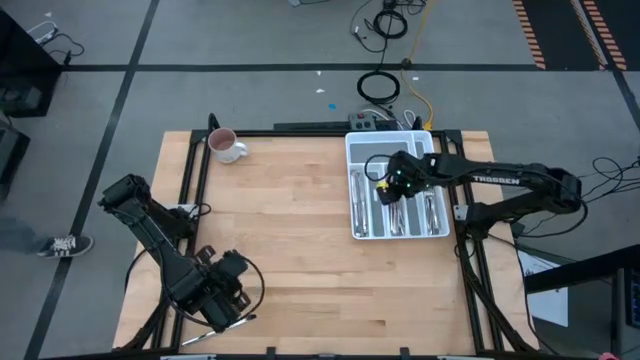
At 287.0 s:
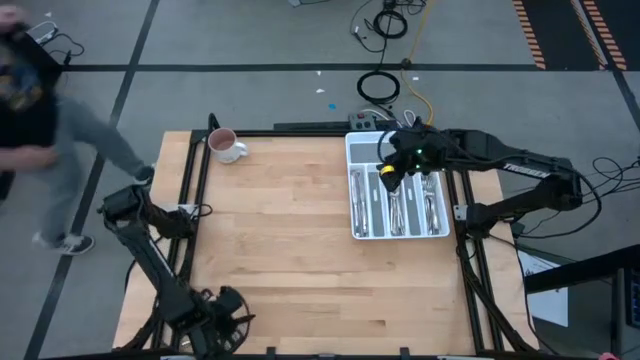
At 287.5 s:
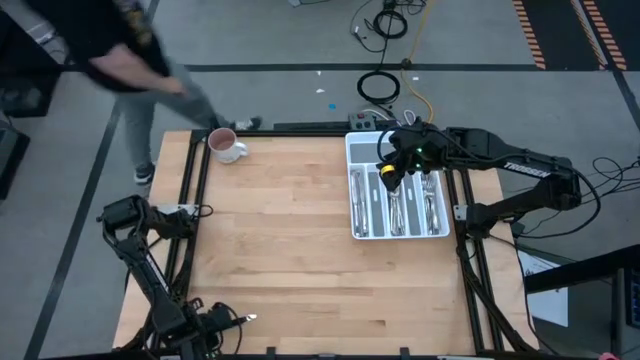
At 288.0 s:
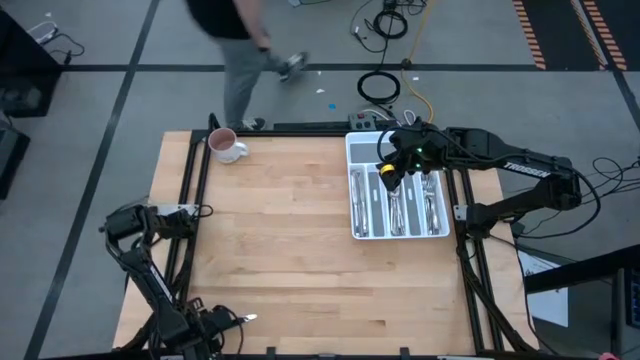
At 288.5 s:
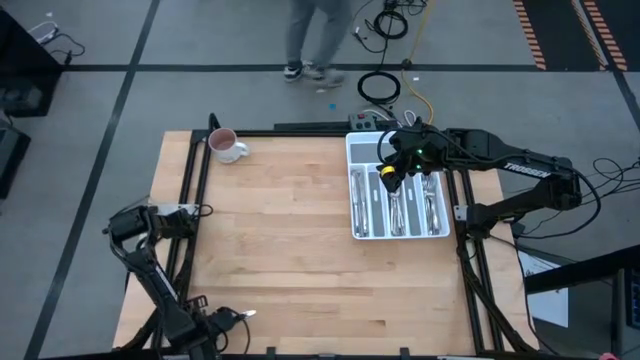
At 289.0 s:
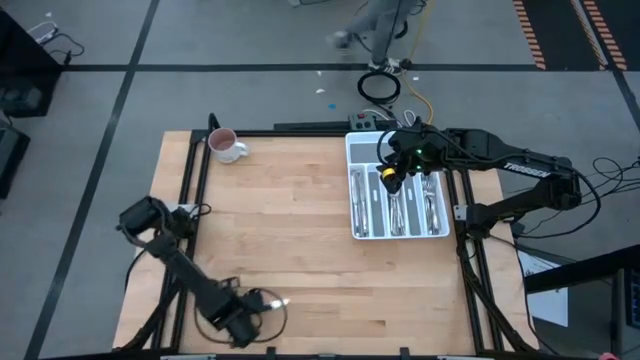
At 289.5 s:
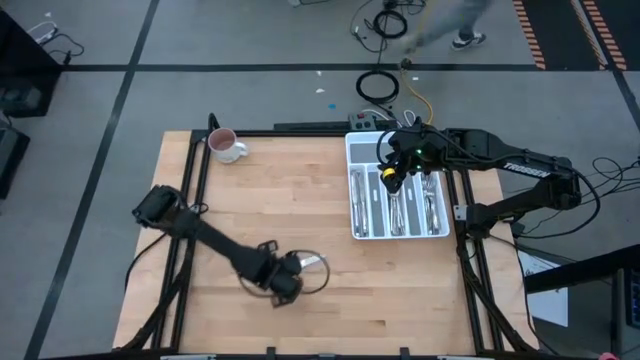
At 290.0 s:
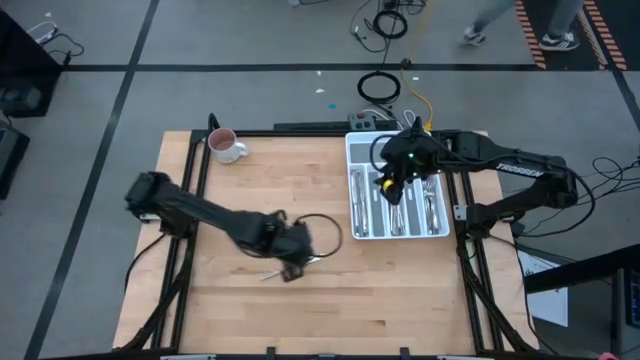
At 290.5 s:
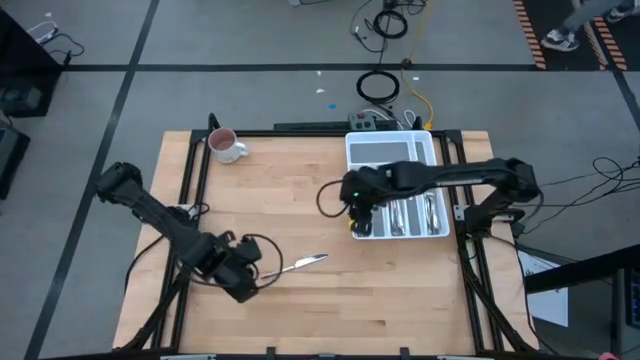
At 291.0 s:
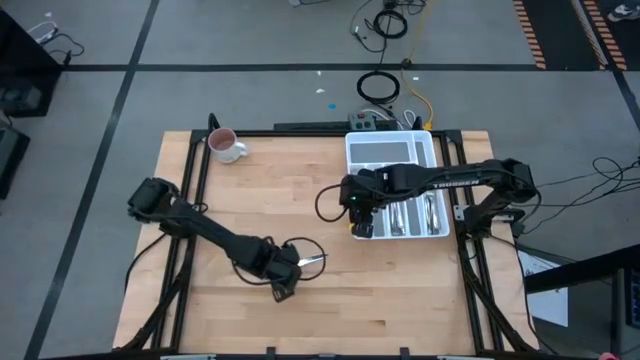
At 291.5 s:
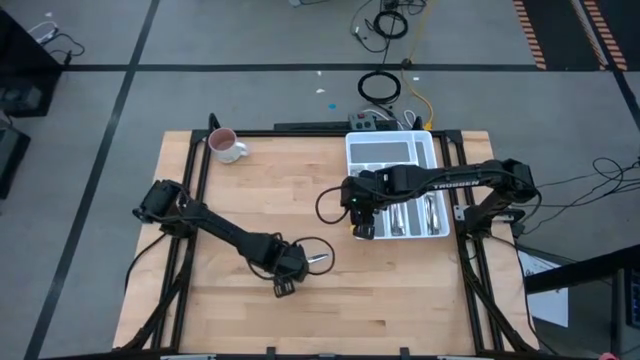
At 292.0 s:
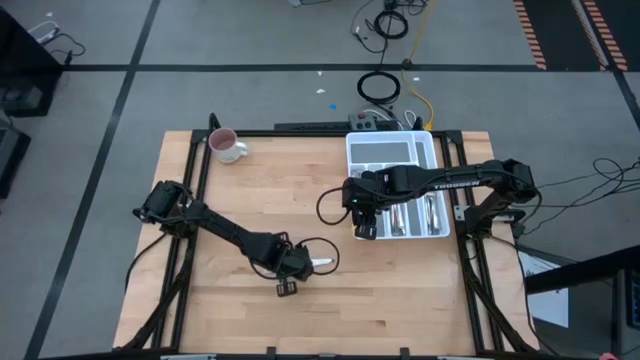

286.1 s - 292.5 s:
Task: Sort silverware
Put the knife in the left section of the silverware tray

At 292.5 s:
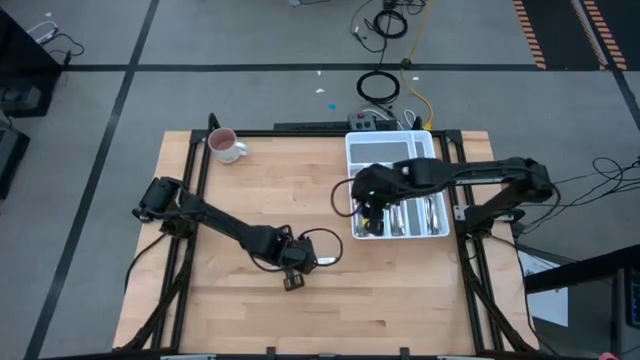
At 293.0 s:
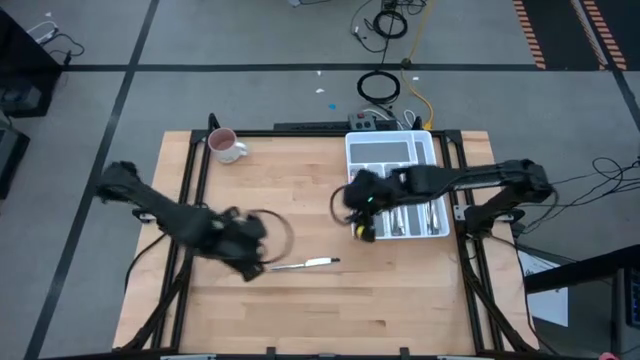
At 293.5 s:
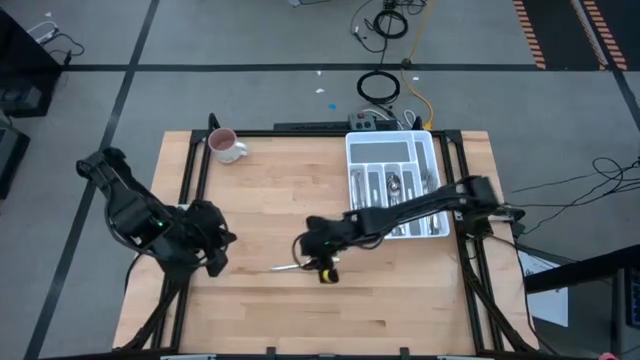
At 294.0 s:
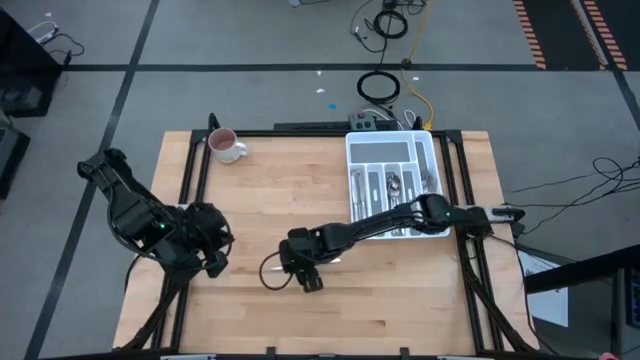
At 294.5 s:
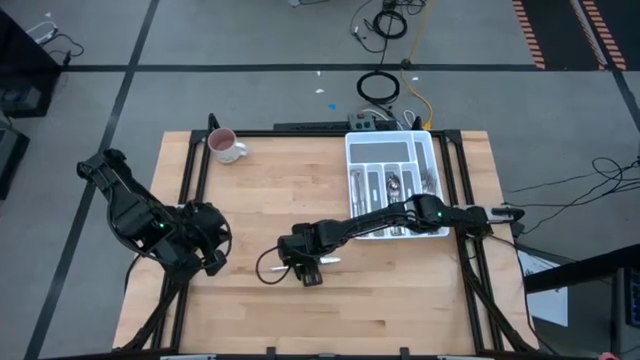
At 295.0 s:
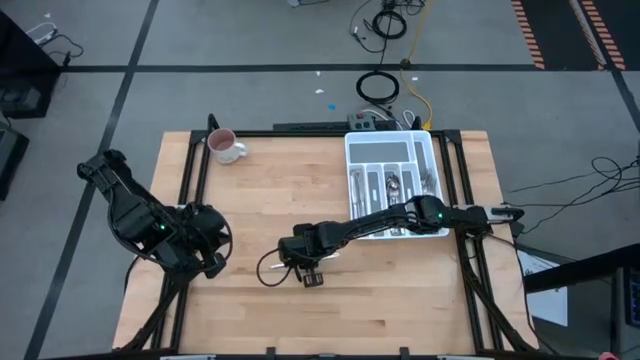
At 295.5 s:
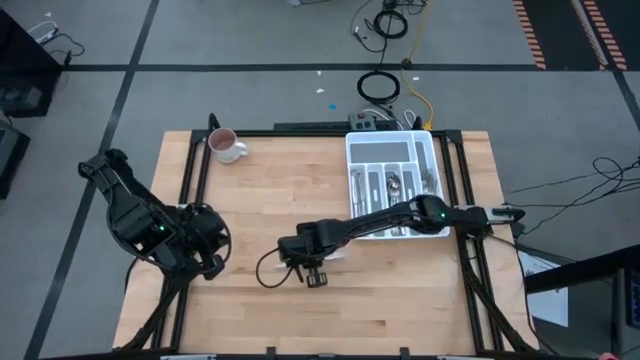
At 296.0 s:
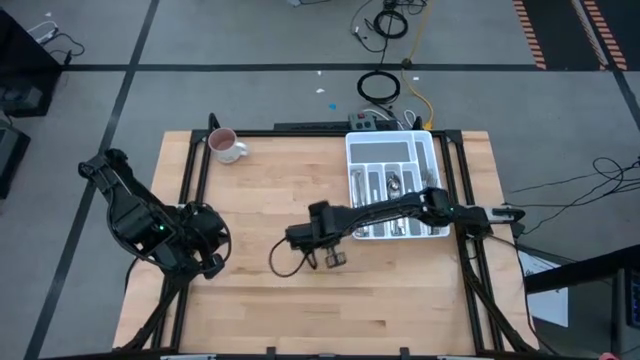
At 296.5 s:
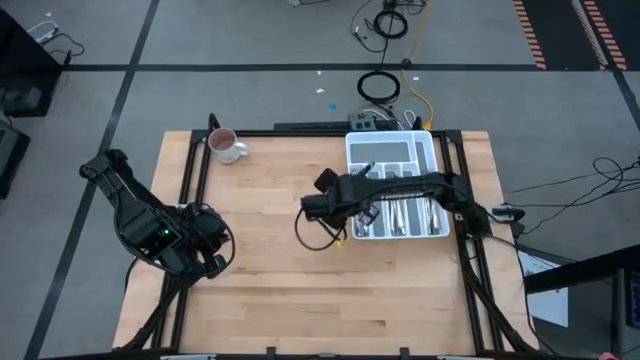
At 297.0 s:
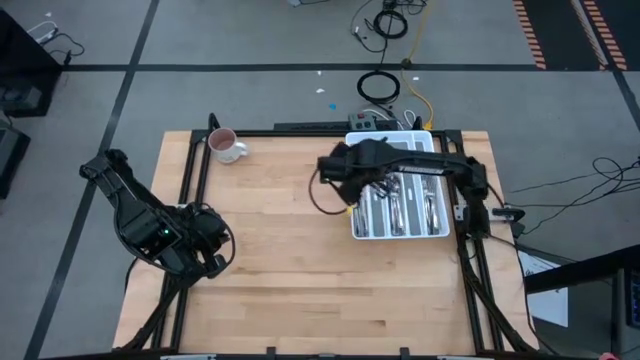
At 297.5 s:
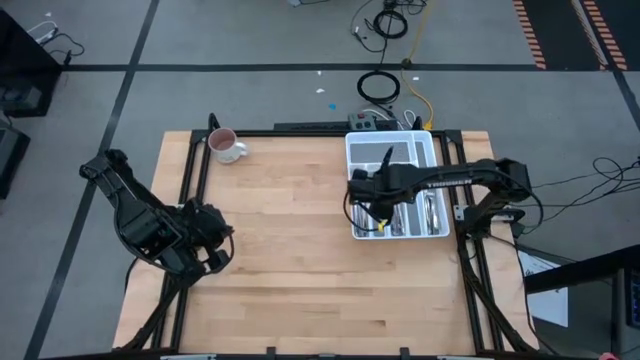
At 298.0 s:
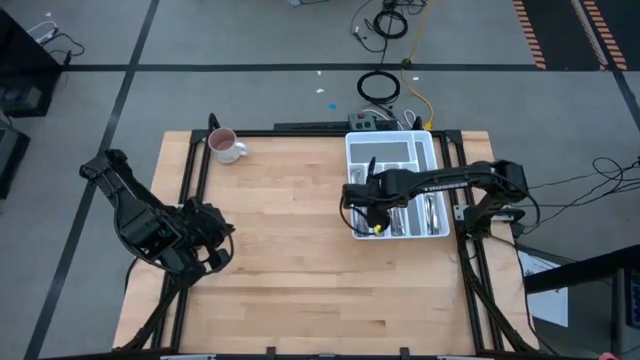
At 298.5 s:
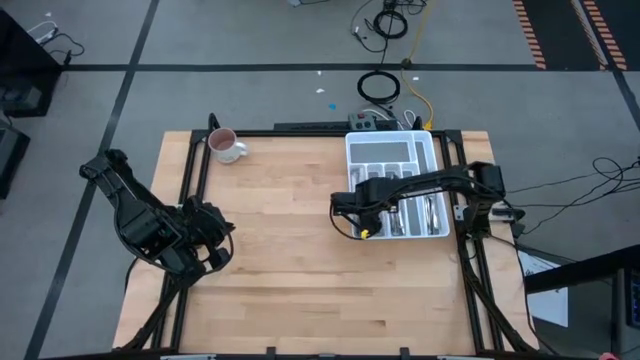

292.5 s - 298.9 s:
Put the knife in the left section of the silverware tray

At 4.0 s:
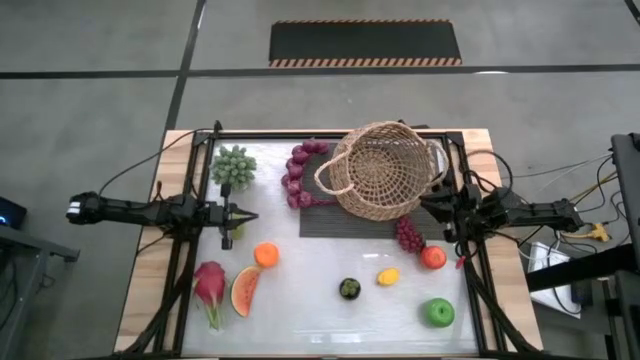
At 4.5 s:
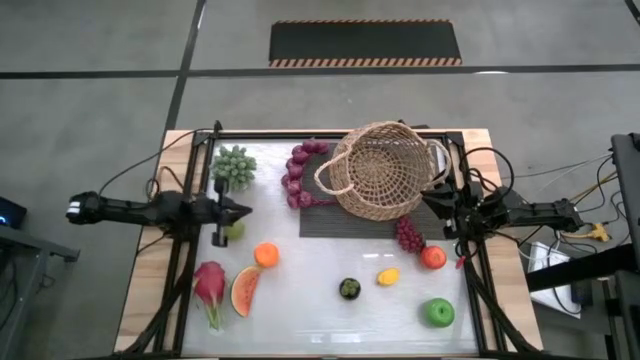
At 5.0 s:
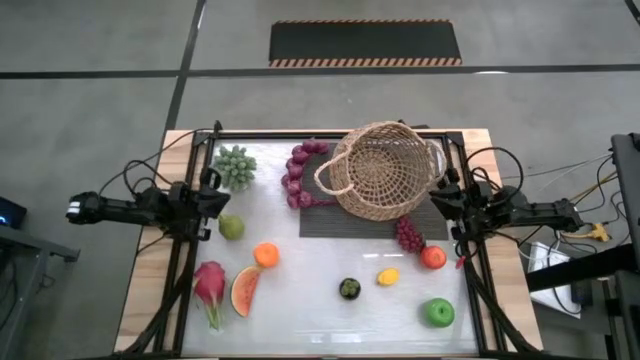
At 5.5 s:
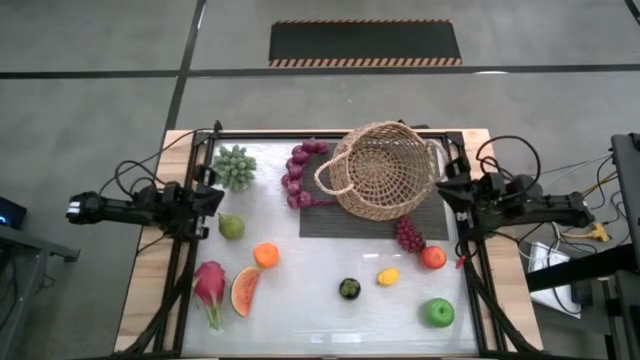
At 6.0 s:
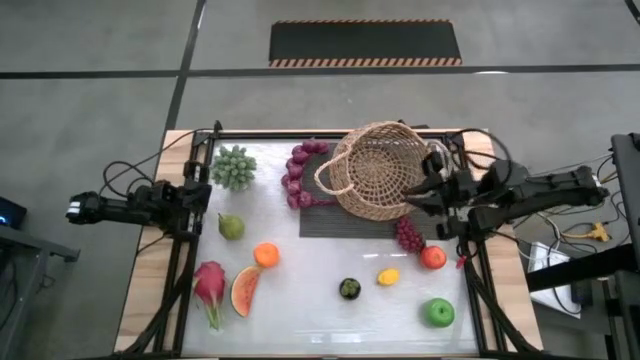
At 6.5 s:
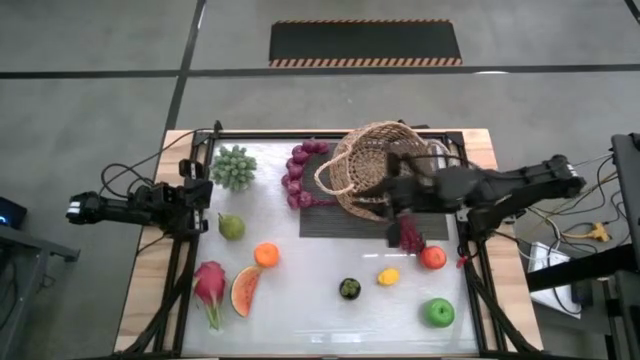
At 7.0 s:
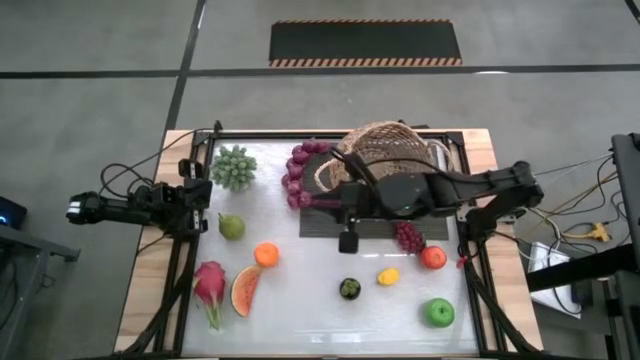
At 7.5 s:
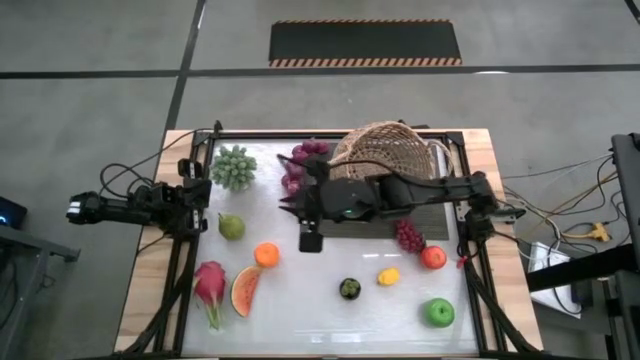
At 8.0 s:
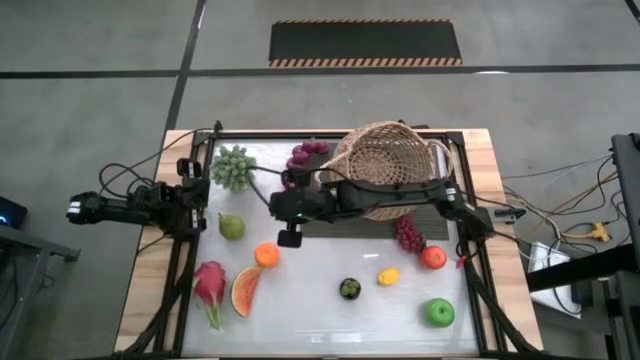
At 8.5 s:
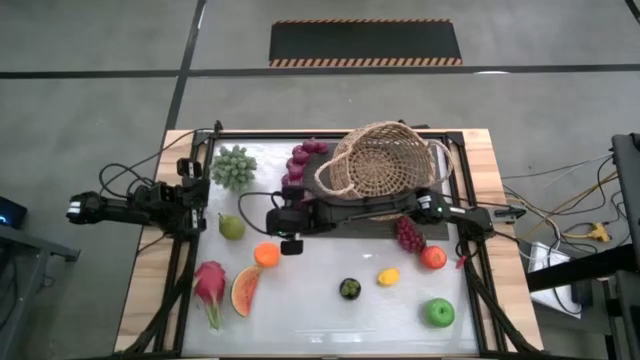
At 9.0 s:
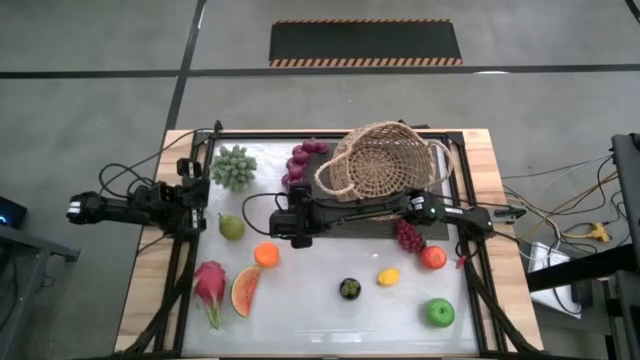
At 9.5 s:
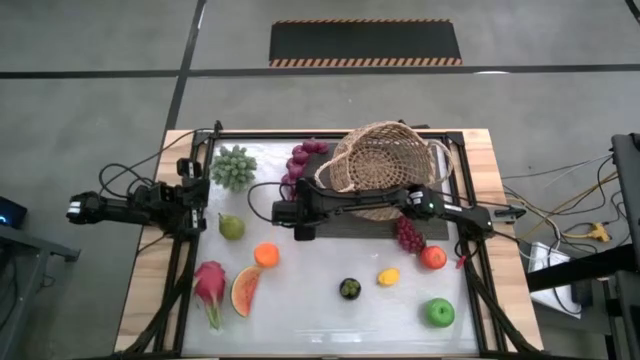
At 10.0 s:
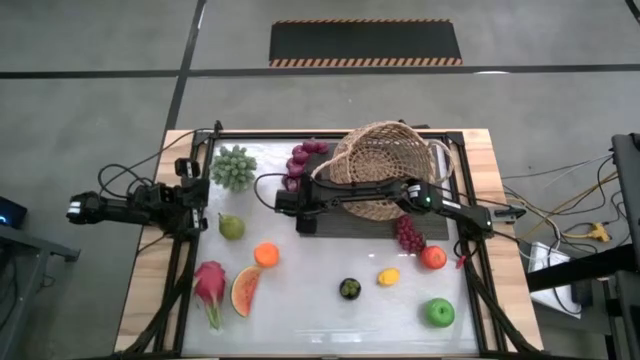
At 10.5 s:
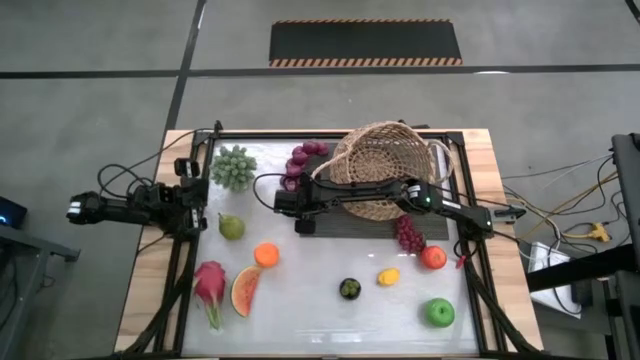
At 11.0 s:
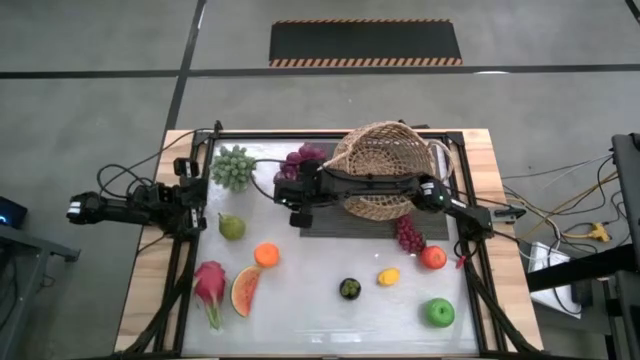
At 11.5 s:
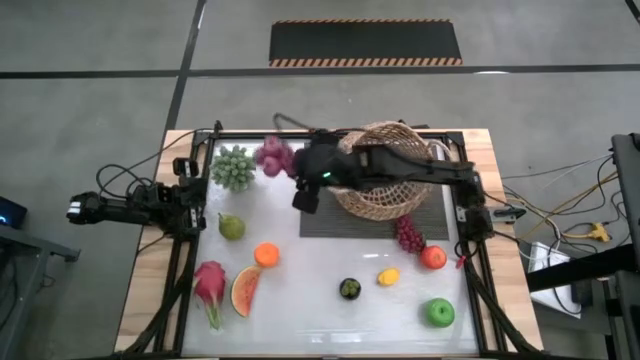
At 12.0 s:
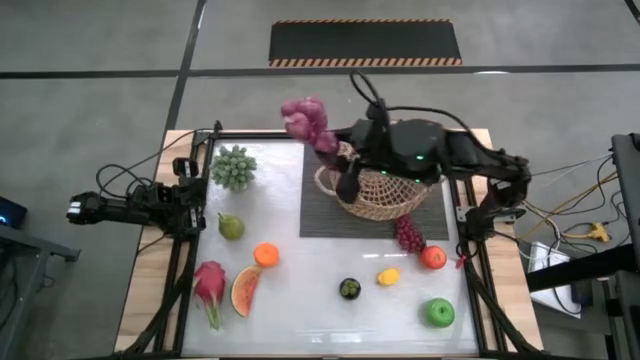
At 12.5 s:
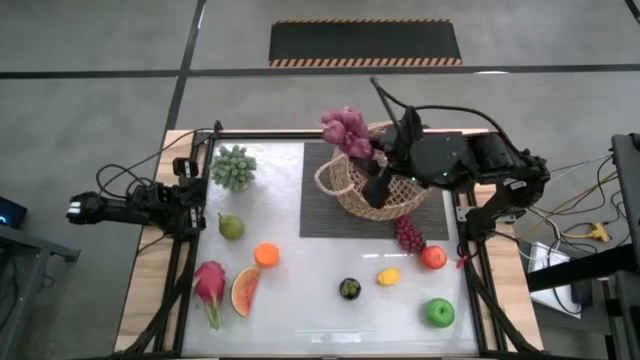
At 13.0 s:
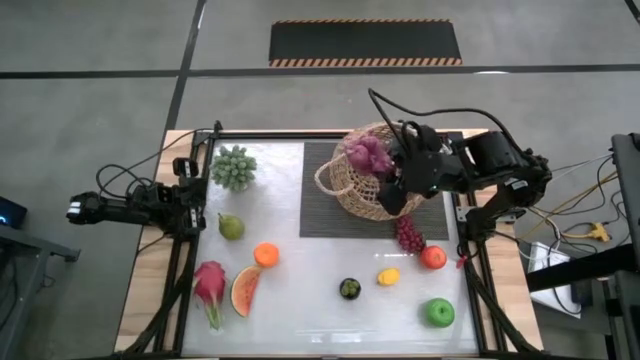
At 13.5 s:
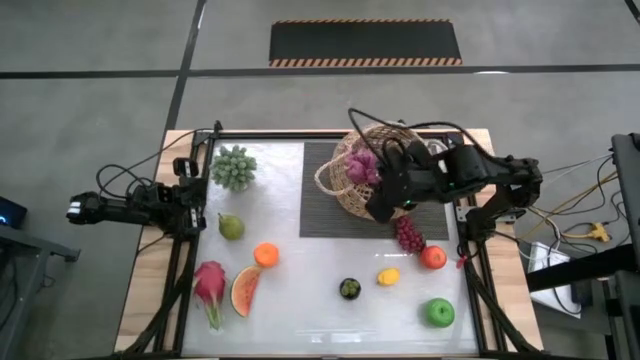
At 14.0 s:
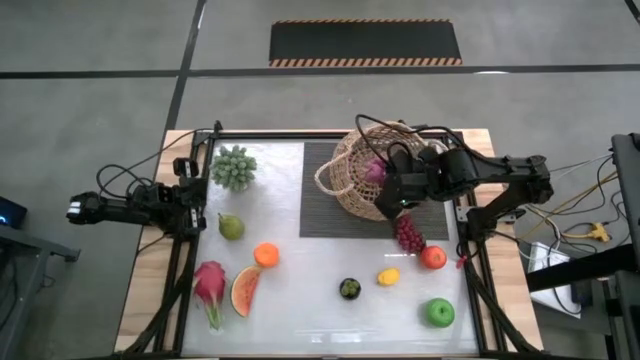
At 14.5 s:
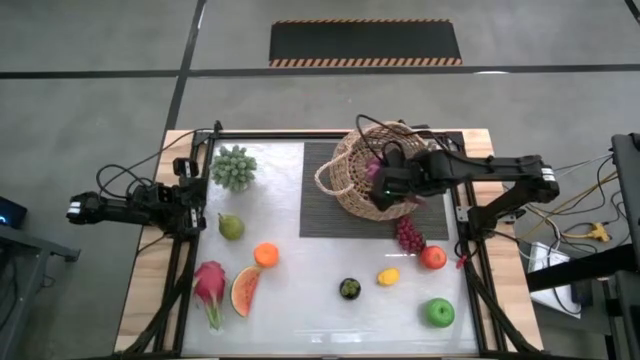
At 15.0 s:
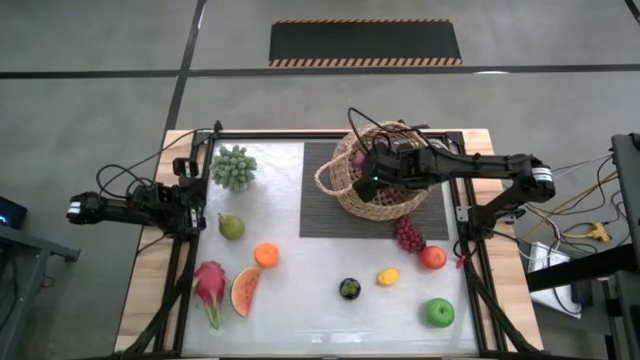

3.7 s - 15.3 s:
Task: Build produce basket
Put the purple garlic into the brown basket
